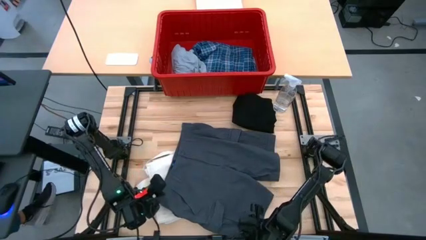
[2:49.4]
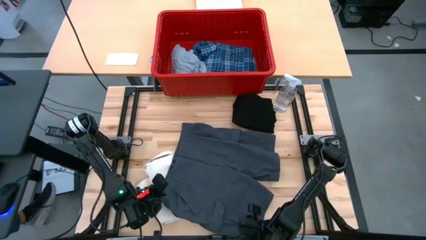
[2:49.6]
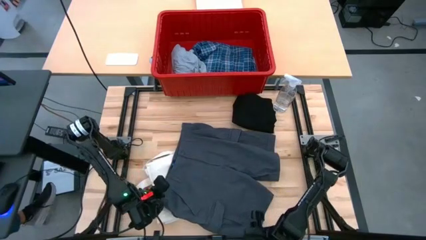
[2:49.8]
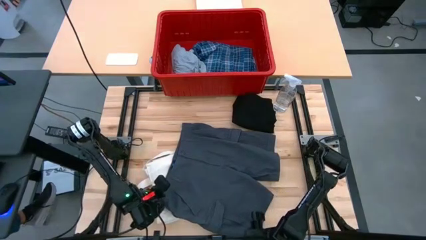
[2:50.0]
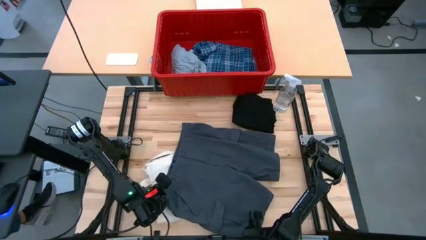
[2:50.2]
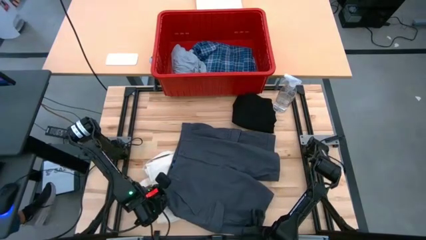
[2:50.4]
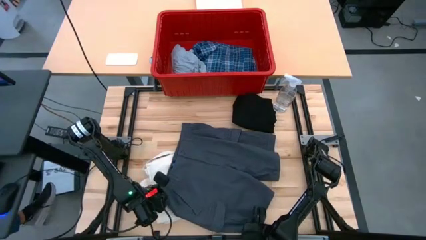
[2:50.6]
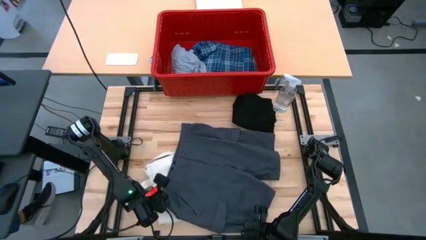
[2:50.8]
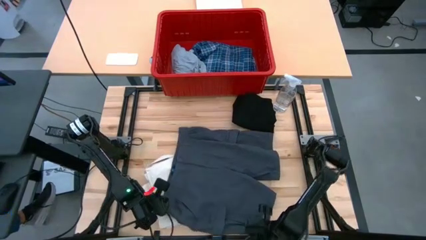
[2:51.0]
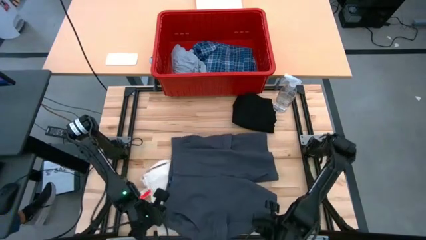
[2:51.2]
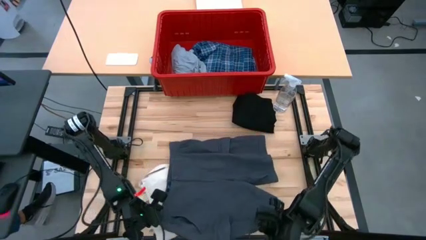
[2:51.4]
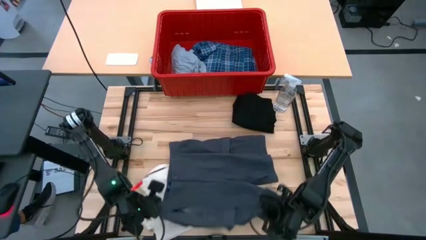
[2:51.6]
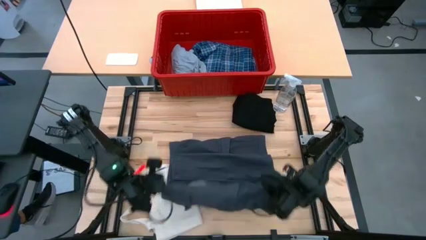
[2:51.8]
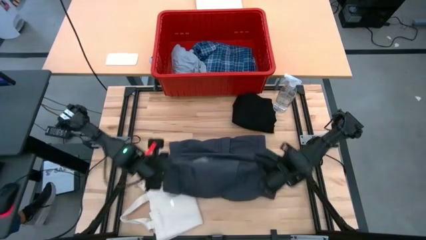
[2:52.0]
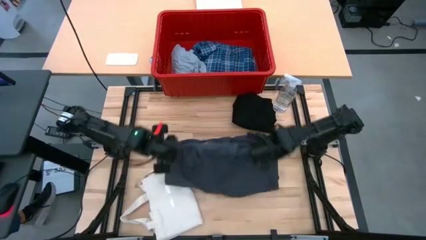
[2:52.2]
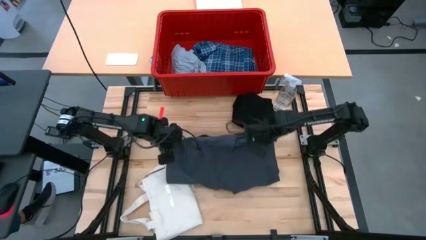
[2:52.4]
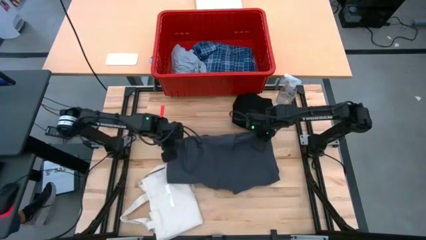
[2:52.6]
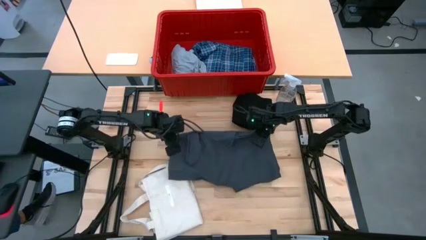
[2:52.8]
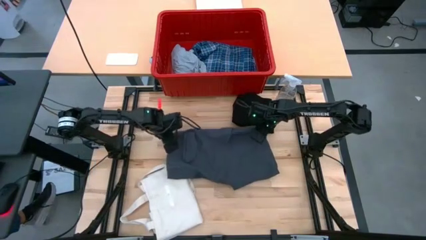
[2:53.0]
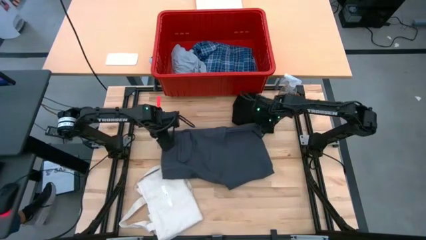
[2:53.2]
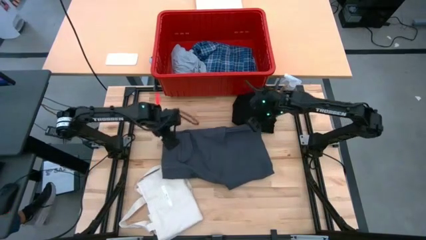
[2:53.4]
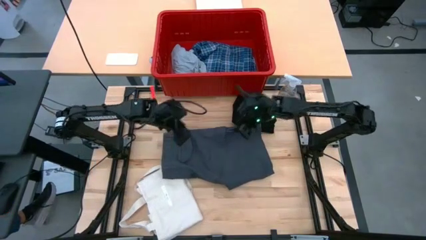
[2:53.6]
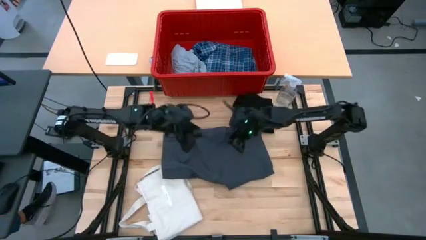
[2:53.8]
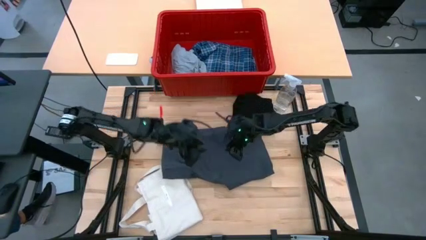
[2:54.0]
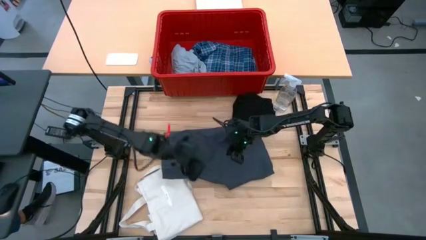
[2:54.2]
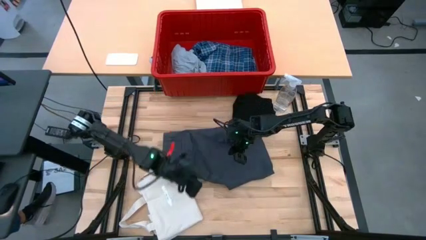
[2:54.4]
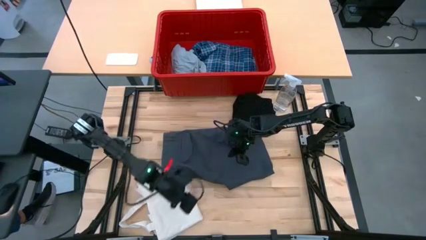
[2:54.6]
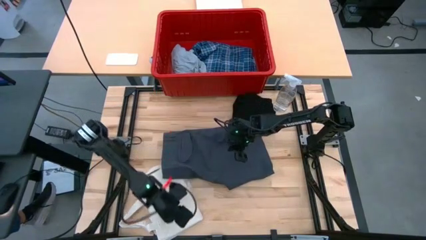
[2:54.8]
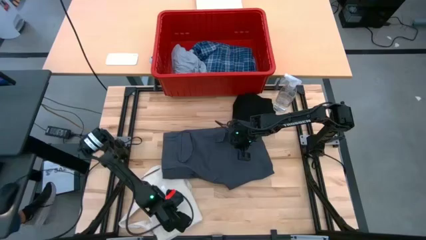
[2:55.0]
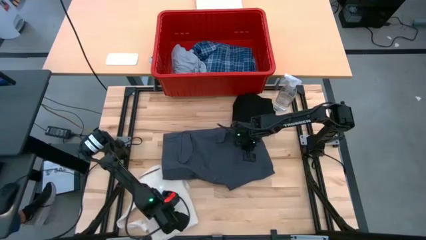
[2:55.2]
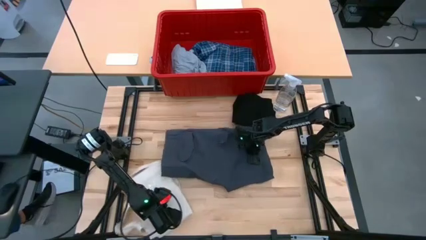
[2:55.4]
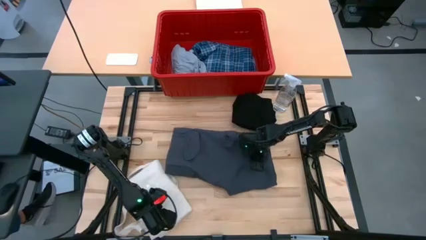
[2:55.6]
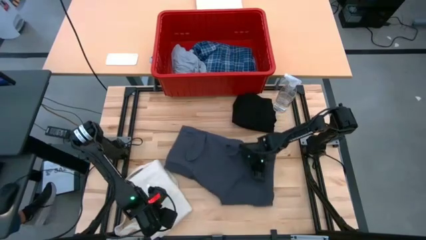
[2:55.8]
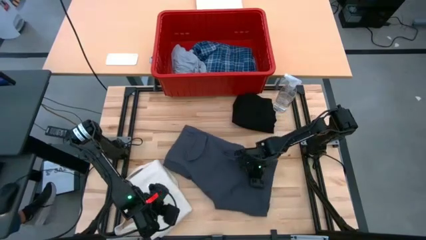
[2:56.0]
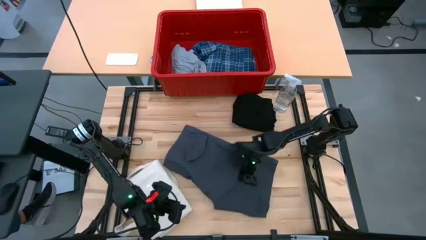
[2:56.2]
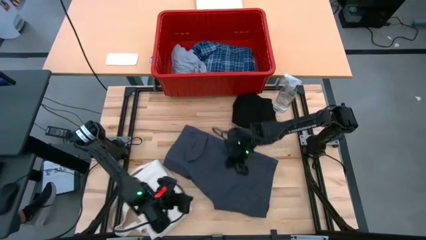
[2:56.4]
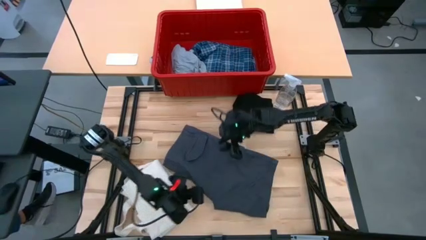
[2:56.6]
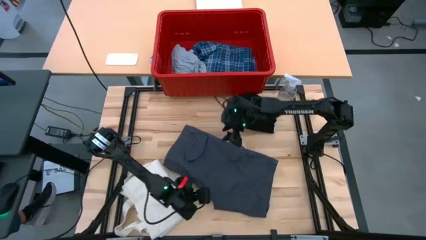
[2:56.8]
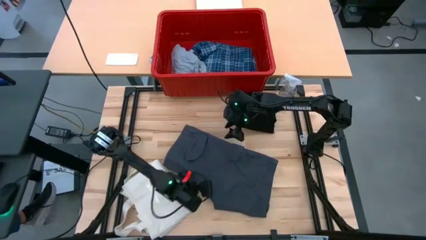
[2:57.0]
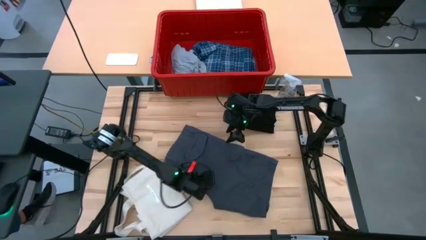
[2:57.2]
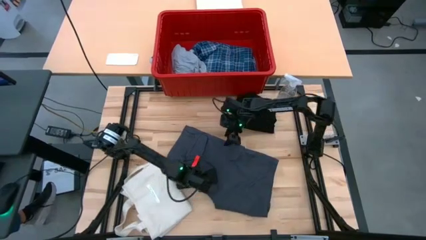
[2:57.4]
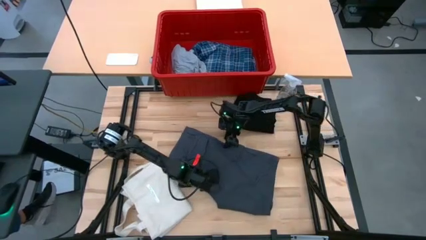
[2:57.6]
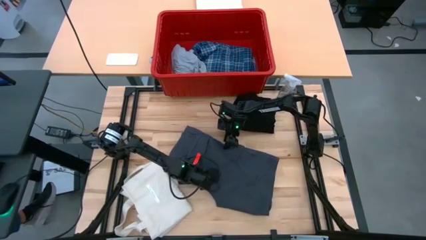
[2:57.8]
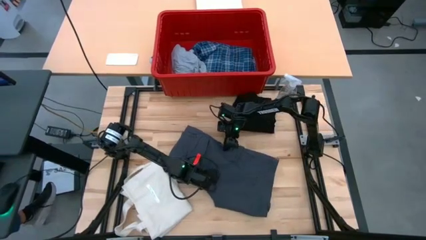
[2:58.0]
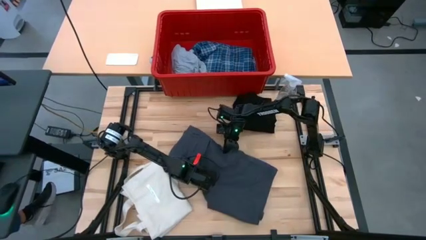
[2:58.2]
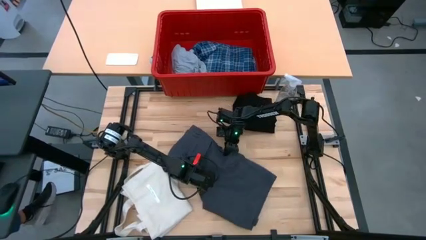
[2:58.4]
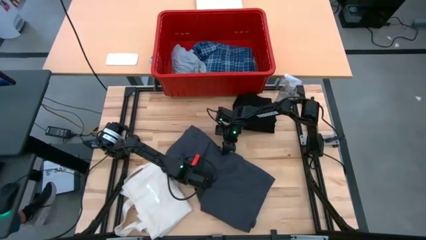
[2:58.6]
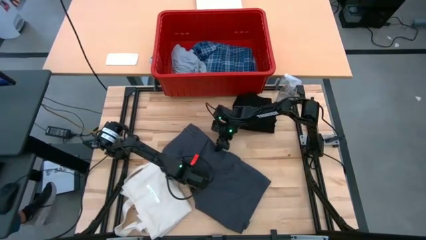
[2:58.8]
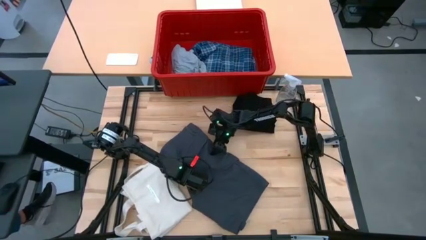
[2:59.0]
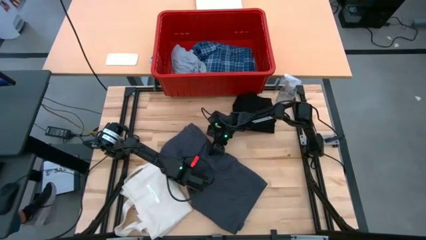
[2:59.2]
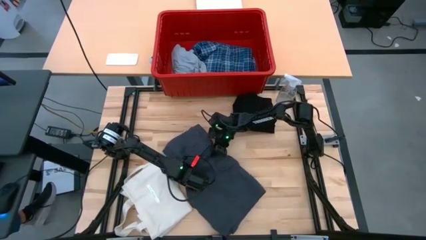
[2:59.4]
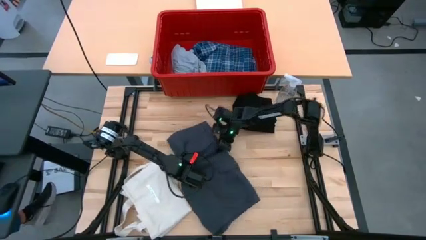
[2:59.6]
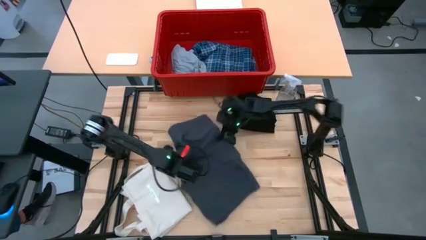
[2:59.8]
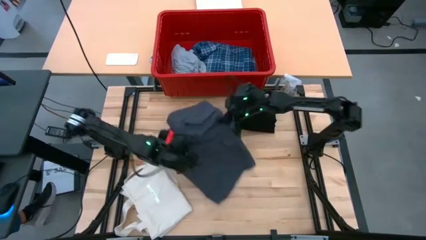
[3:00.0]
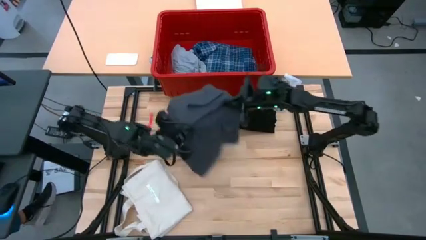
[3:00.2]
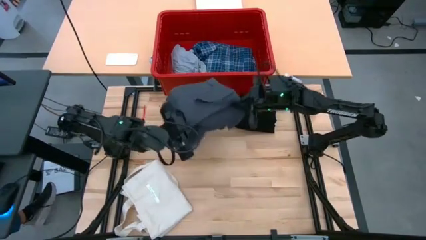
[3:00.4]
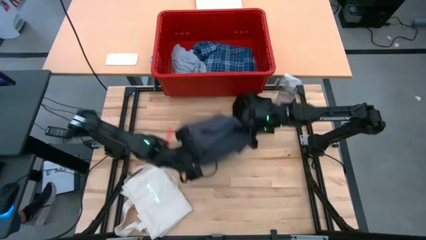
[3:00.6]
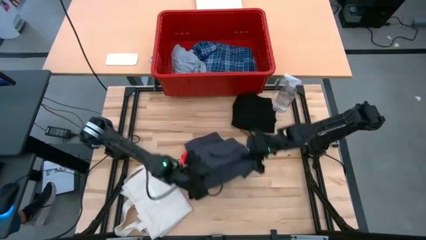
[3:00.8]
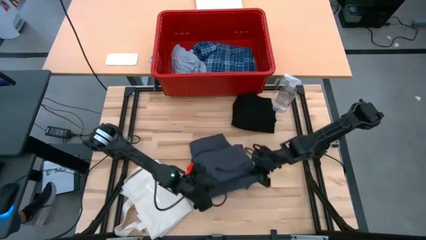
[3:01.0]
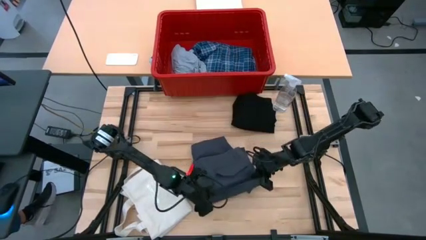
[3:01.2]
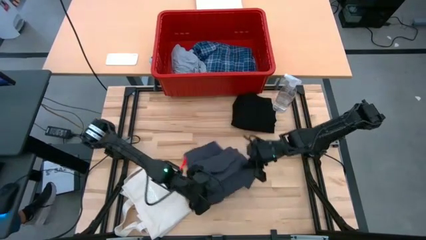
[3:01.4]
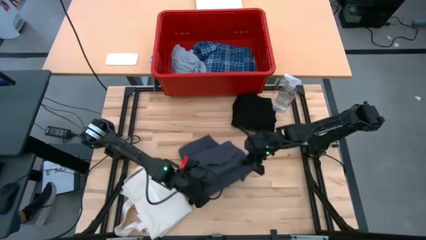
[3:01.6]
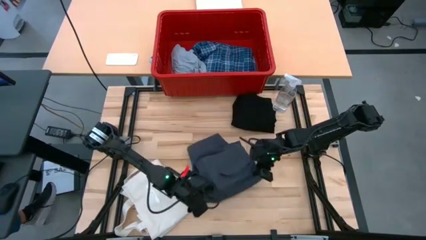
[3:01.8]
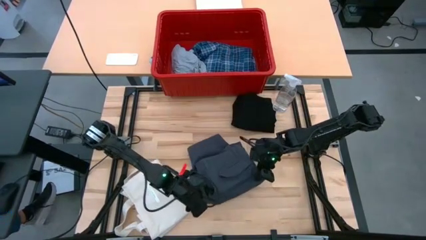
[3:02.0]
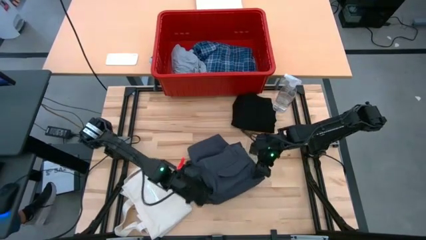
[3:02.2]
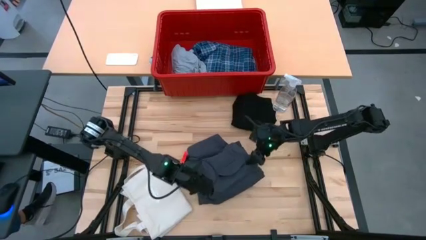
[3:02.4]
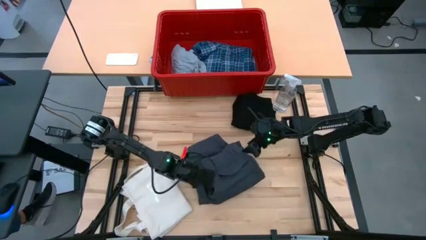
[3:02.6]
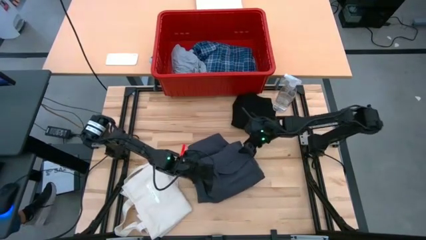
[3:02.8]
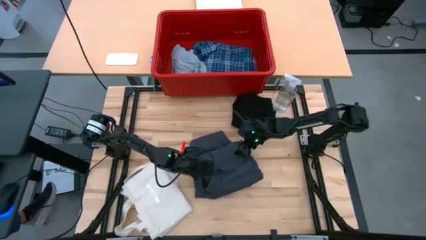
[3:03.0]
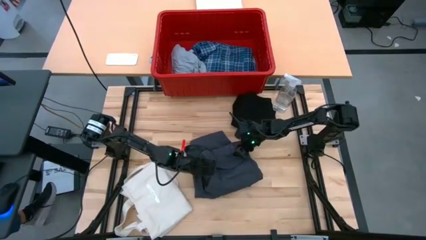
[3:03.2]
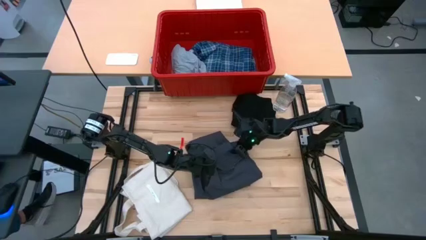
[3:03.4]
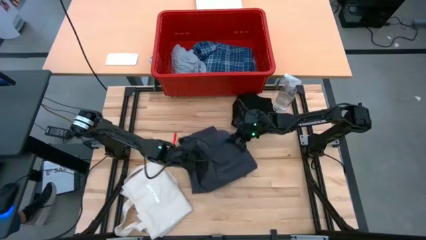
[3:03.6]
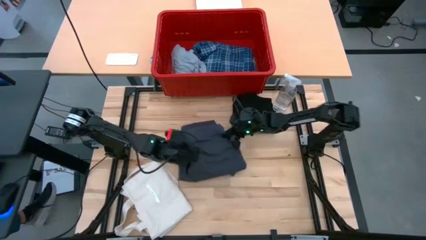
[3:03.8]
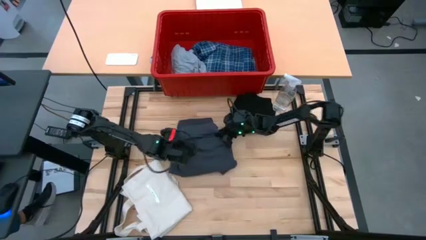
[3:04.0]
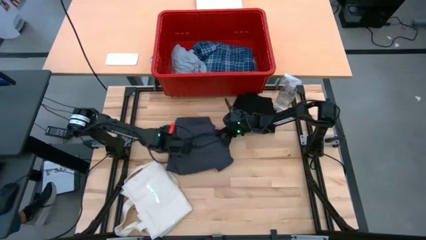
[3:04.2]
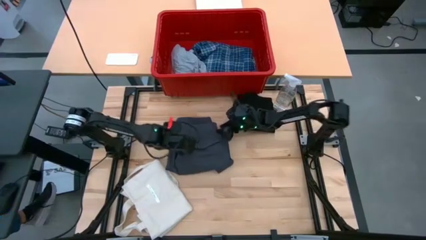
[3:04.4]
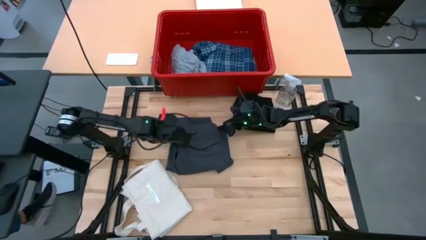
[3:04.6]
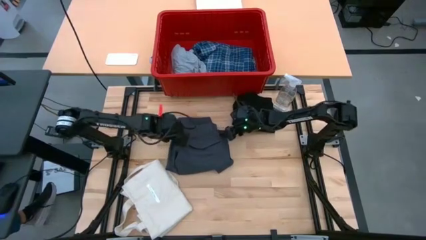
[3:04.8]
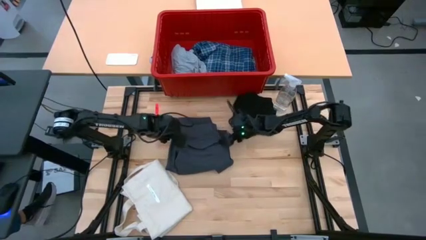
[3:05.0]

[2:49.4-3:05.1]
Task: Fold Laundry from Bin
Fold the gray shorts
